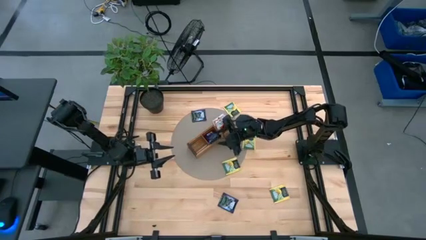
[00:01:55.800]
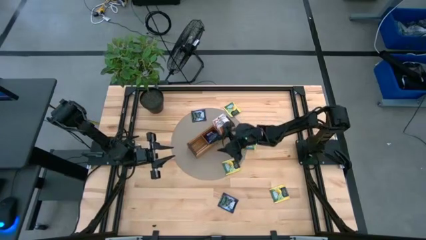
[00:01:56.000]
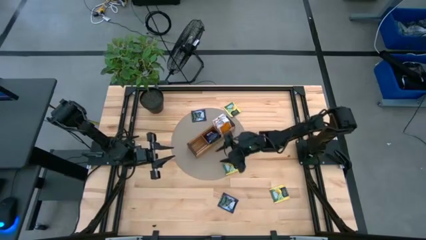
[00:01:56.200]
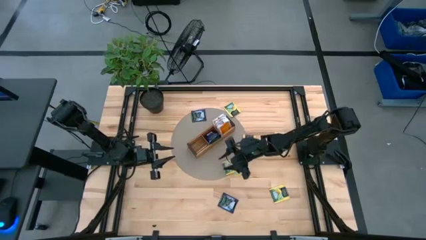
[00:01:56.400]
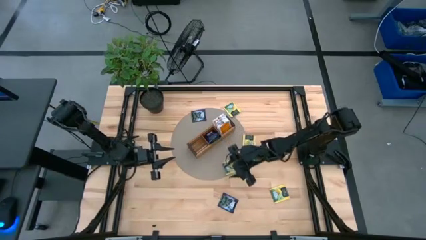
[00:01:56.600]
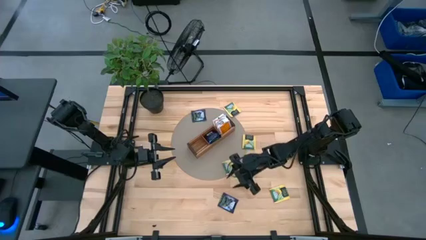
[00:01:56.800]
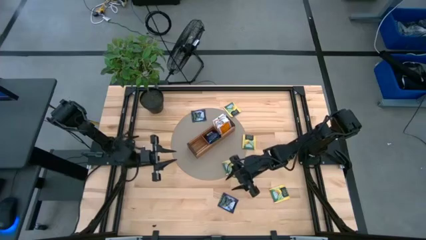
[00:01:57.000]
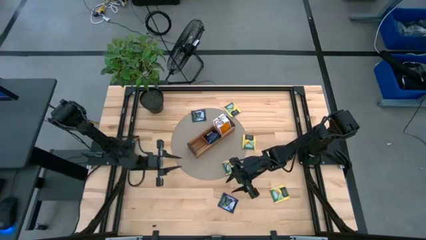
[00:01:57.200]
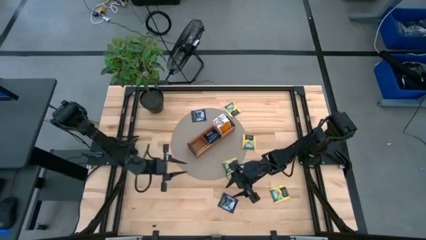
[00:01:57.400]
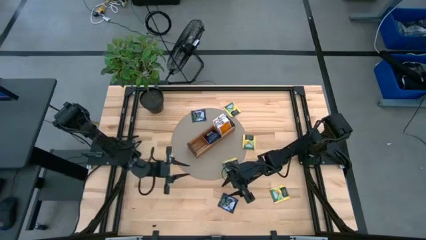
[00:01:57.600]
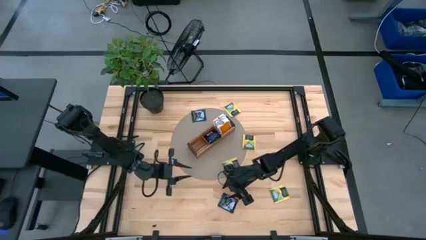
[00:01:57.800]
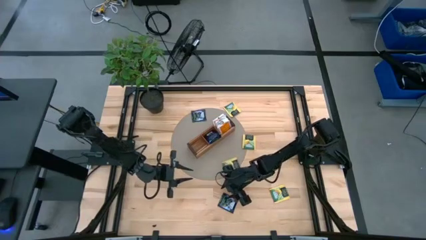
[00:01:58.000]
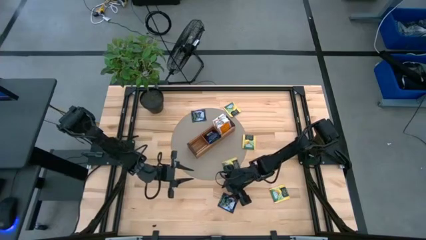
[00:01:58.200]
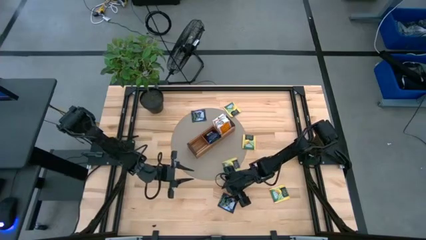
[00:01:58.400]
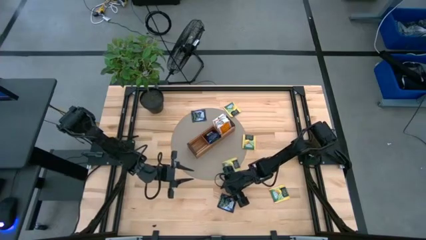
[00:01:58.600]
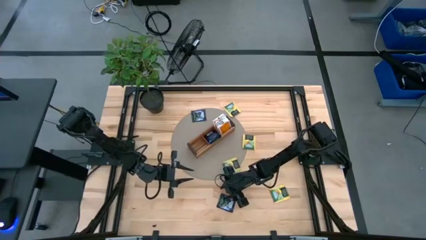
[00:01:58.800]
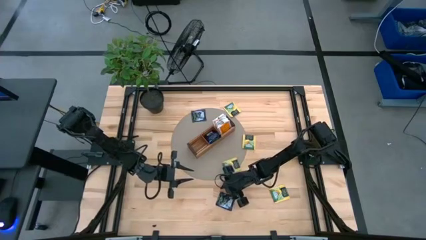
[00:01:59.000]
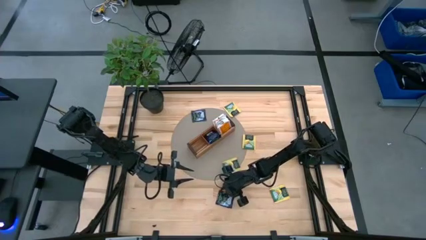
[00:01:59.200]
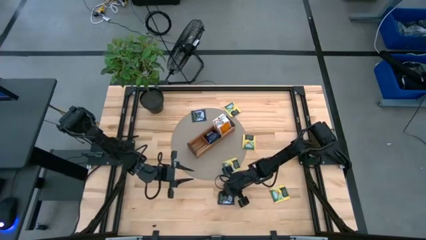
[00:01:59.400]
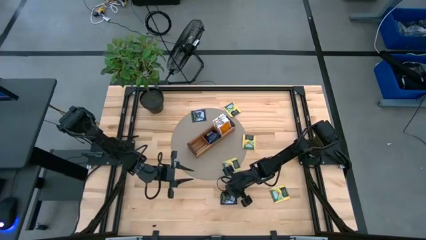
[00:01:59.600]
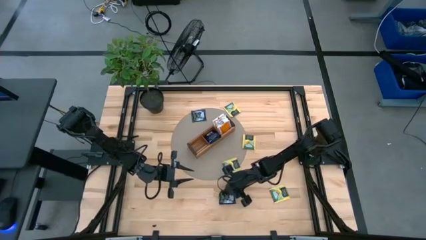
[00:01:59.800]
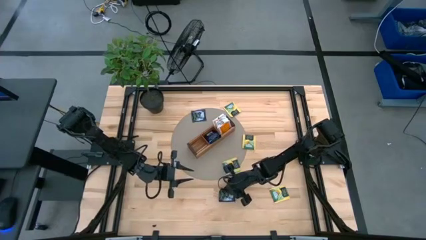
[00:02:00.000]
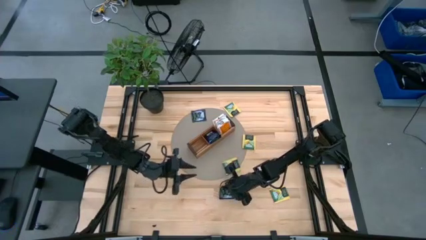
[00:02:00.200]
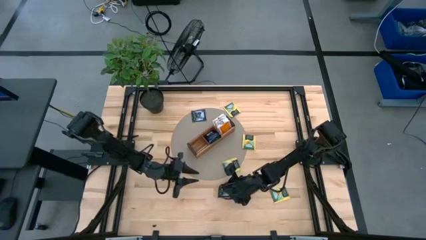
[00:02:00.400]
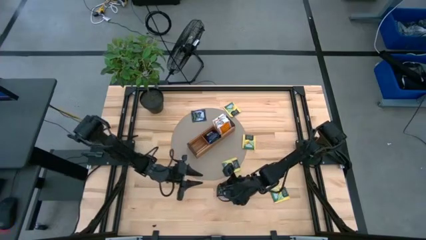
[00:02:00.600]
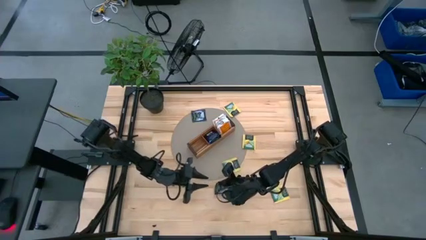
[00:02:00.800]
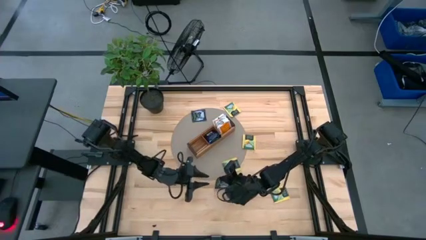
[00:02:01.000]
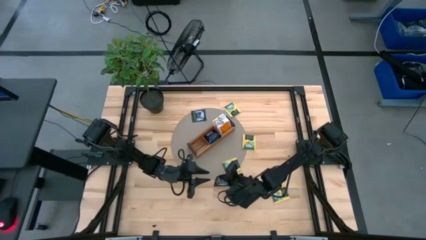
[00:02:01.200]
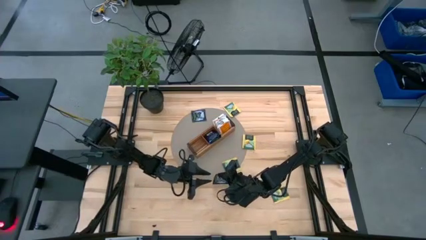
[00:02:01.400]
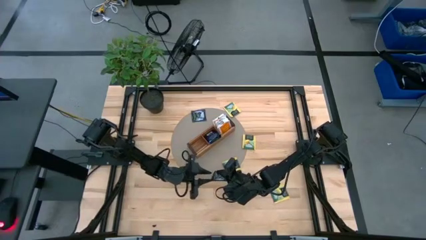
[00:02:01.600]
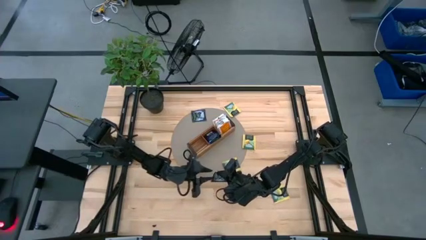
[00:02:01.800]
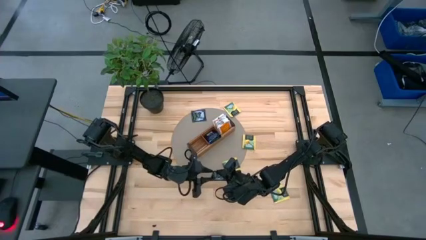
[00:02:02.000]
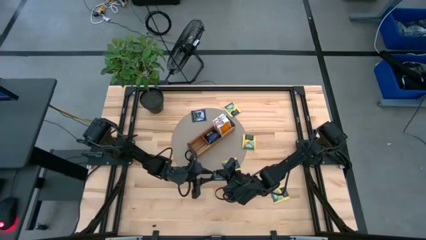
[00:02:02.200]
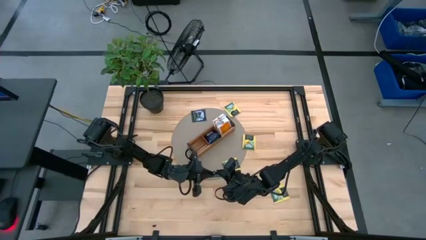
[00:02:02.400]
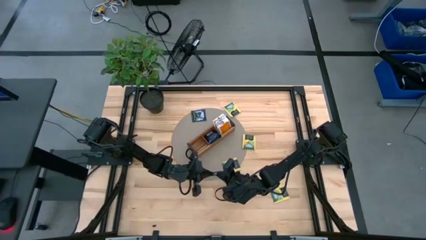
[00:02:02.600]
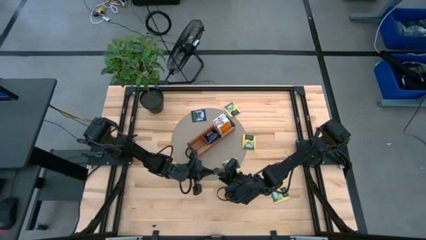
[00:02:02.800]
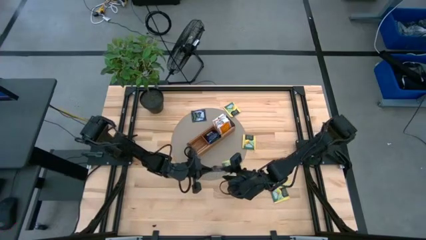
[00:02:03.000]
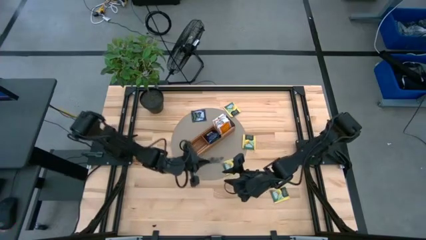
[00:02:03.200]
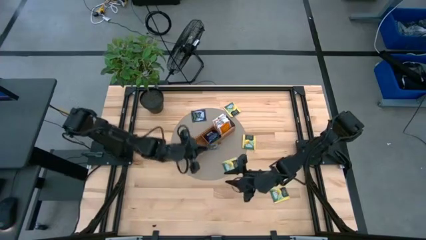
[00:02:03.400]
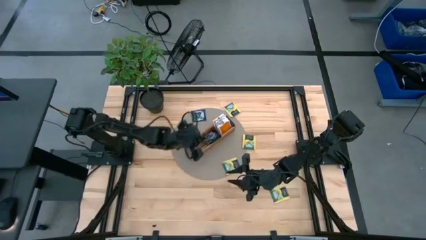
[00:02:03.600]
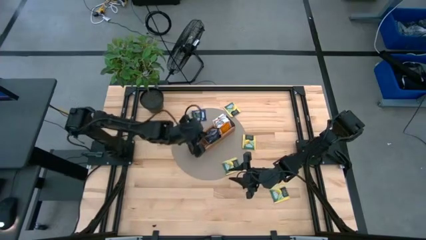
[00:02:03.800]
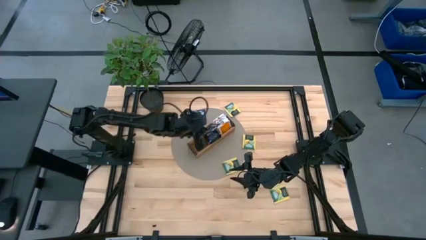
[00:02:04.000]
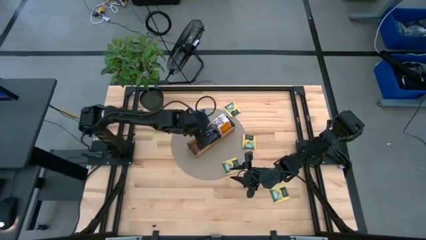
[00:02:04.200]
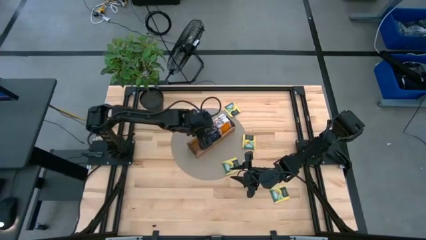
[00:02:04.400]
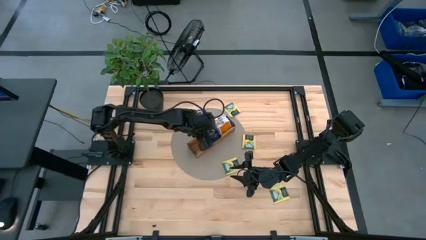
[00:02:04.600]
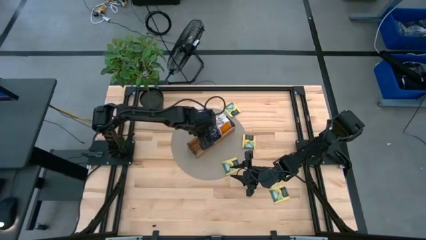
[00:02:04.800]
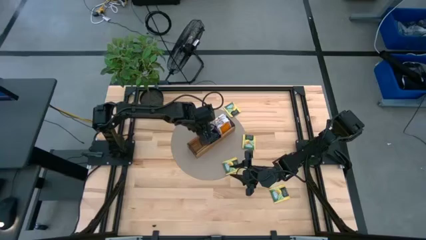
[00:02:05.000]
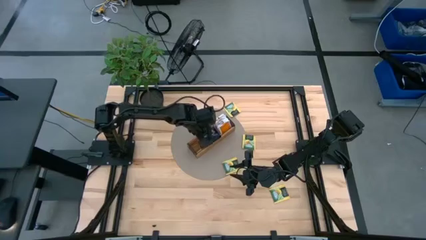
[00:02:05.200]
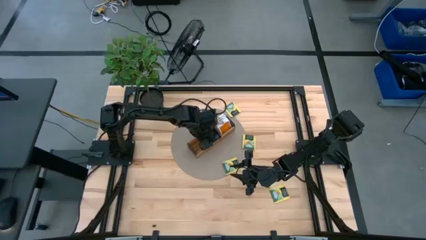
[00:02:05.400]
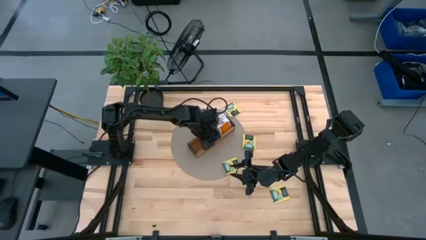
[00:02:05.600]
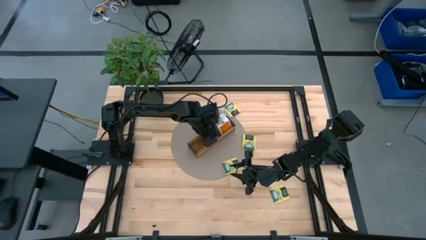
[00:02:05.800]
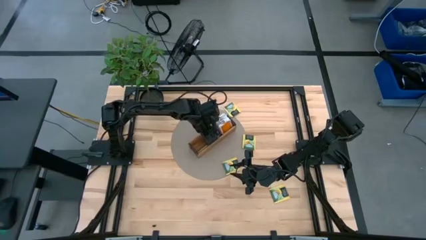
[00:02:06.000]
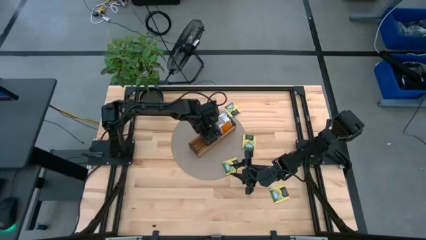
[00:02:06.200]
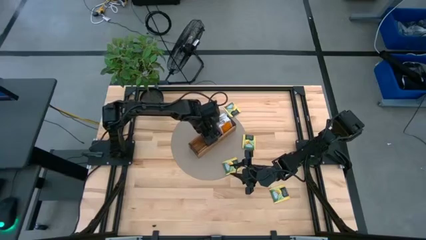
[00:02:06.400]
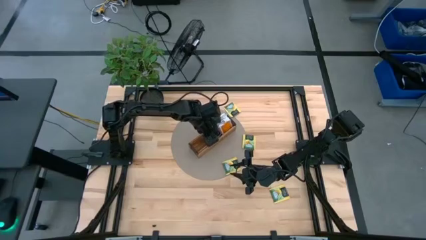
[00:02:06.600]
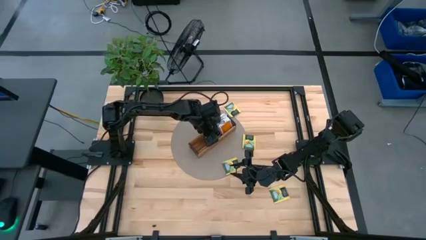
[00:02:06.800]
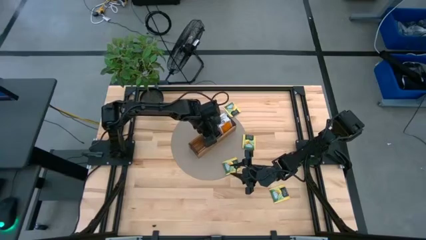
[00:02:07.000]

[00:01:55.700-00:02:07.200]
Task: Pick & Place Tea
Put the purple tea bag into the middle section of the wooden organizer

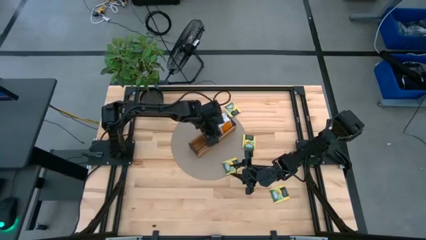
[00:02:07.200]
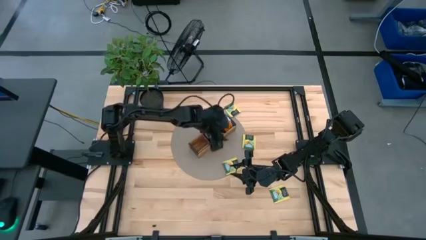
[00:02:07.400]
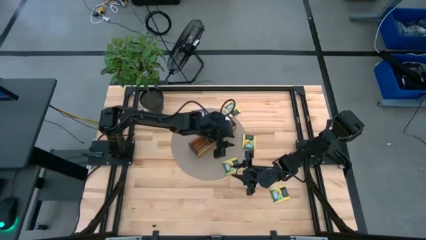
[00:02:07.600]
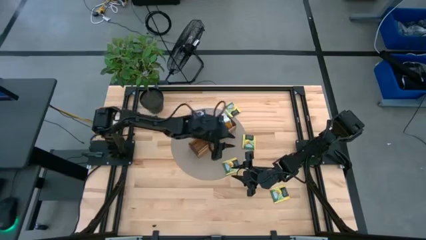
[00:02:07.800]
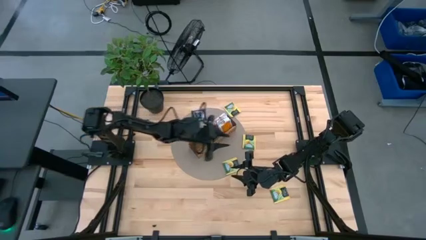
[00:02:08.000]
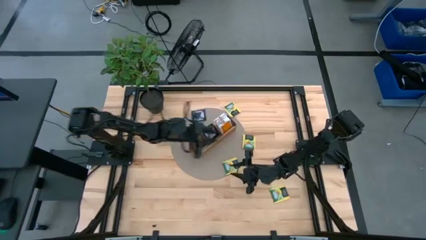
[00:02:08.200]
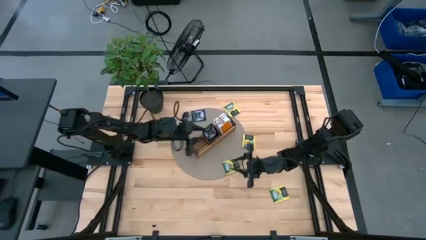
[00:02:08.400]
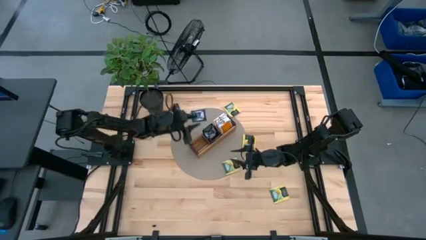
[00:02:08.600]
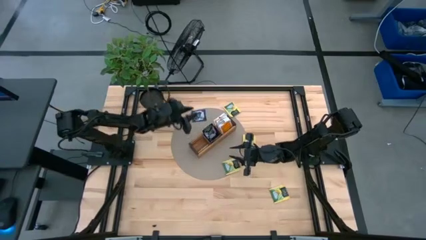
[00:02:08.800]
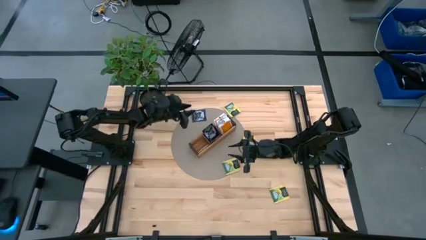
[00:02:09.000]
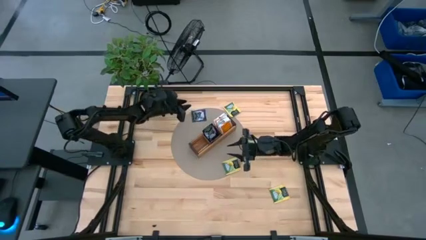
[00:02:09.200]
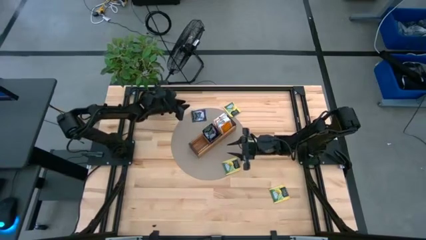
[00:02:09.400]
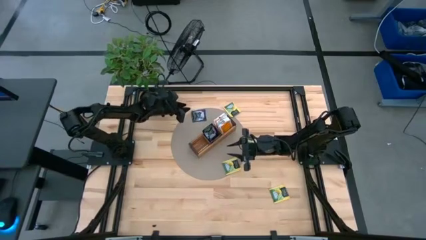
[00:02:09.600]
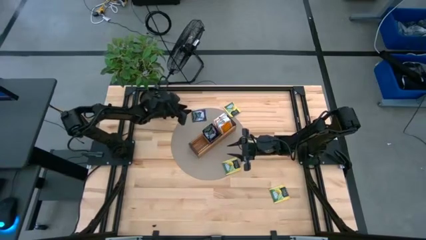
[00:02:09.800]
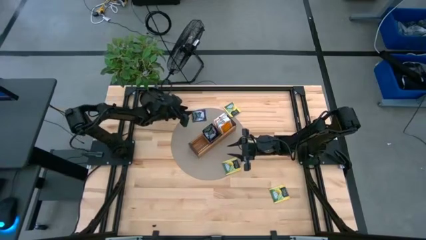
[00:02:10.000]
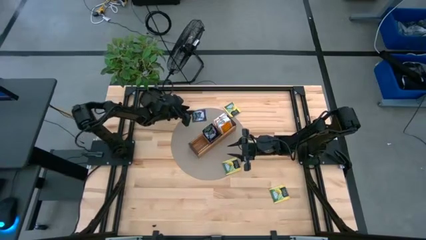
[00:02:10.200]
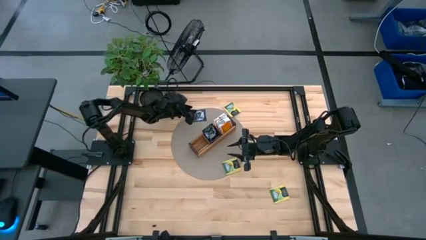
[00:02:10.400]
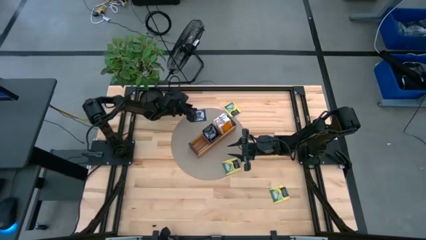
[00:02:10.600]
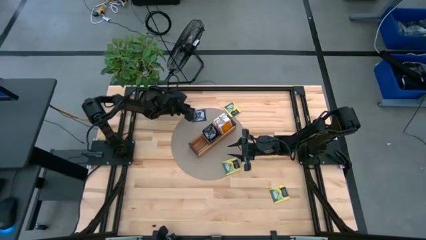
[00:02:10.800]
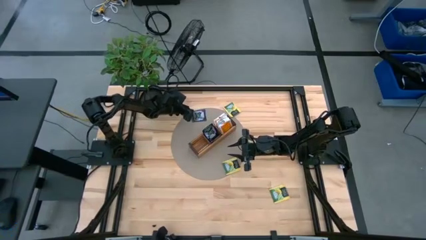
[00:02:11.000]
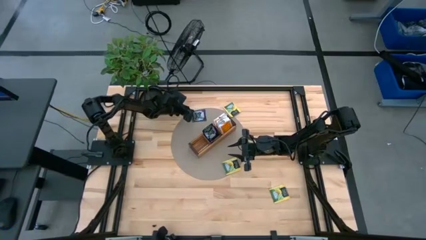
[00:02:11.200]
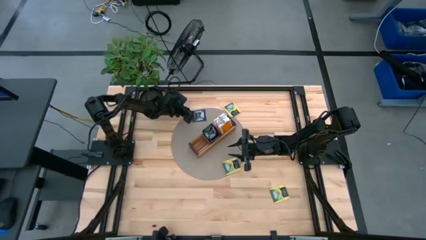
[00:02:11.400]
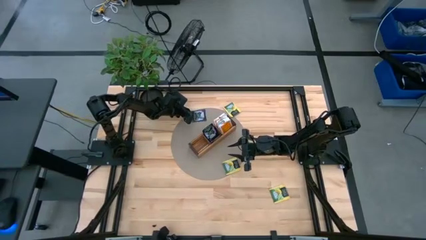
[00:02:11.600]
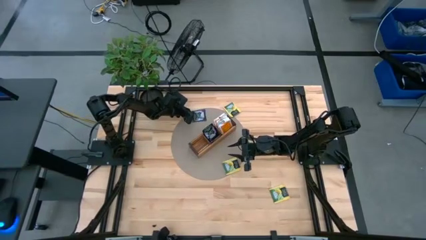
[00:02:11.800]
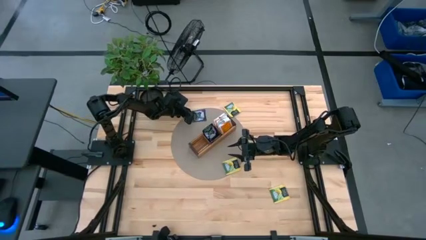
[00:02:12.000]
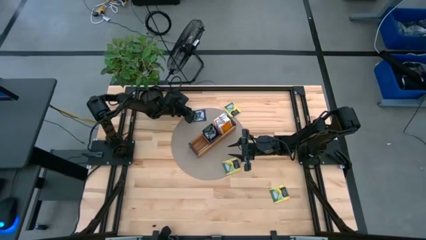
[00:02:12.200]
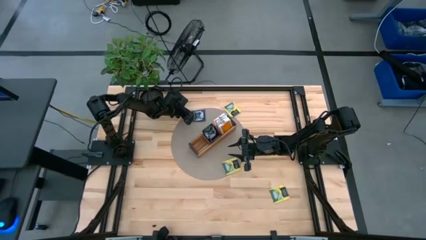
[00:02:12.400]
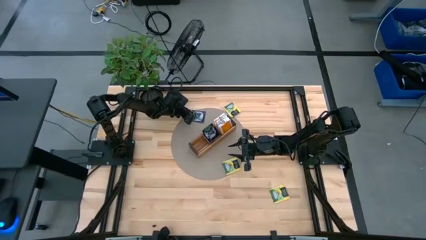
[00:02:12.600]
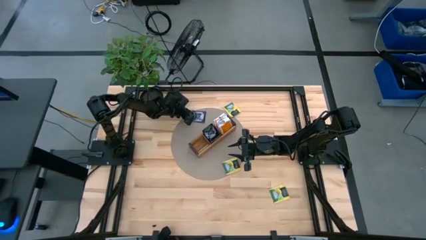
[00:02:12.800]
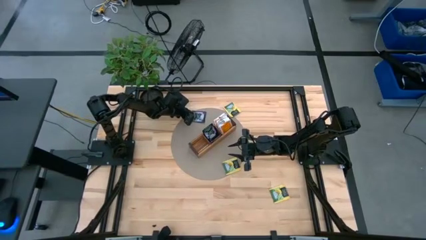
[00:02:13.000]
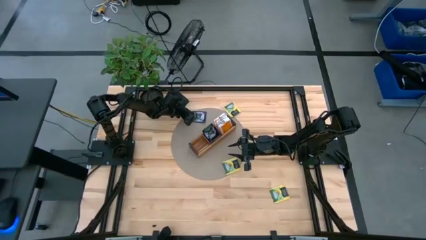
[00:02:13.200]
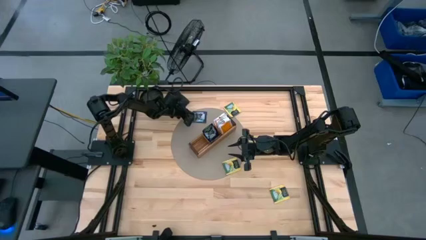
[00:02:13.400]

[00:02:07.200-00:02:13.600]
Put the purple tea bag into the middle section of the wooden organizer
